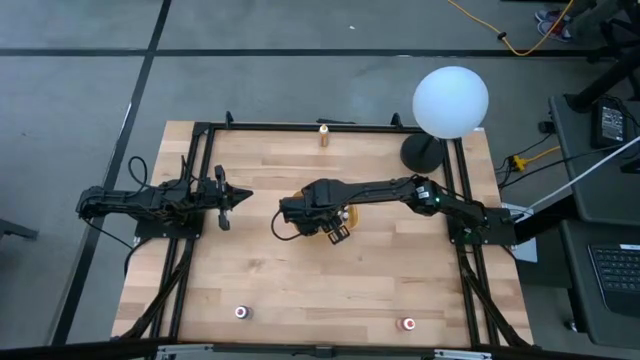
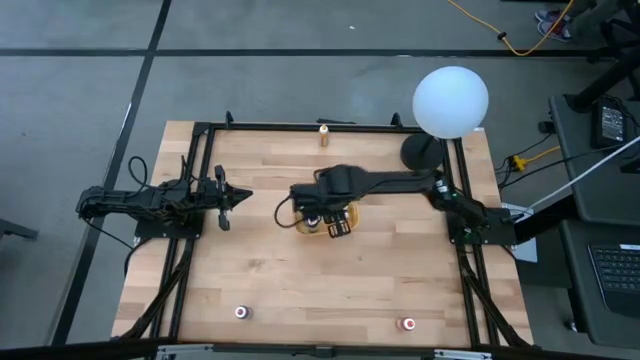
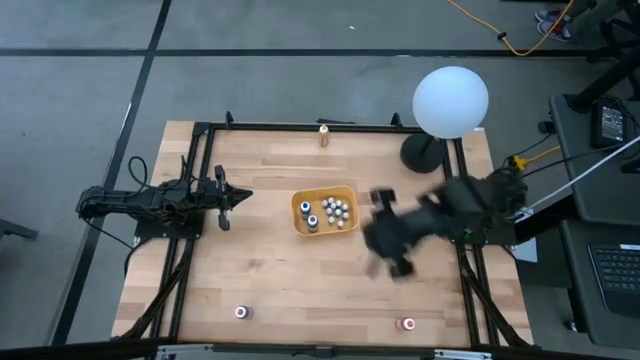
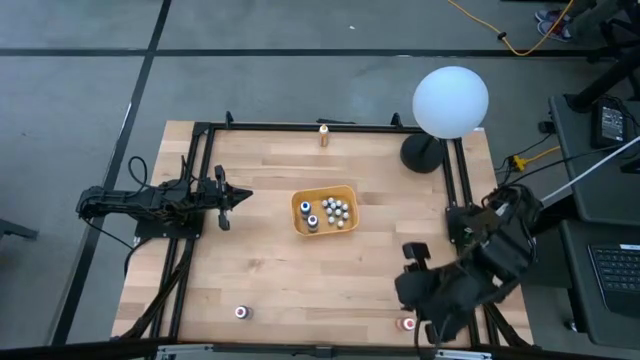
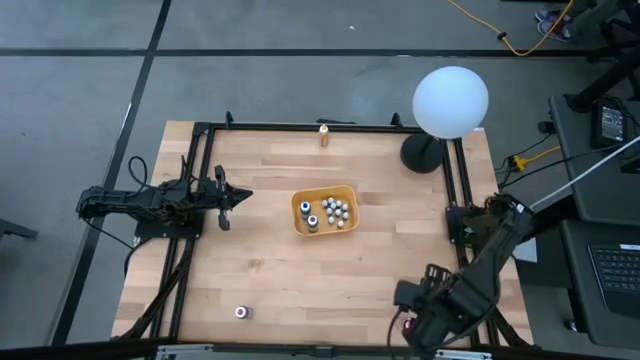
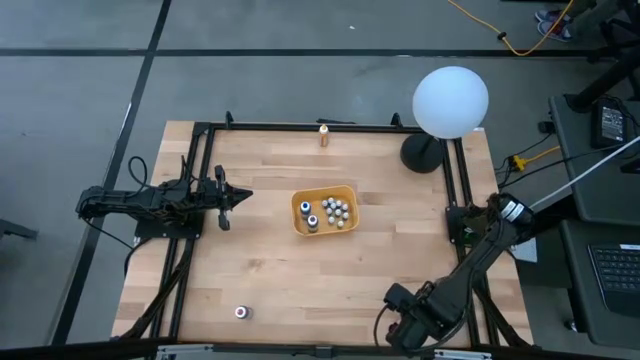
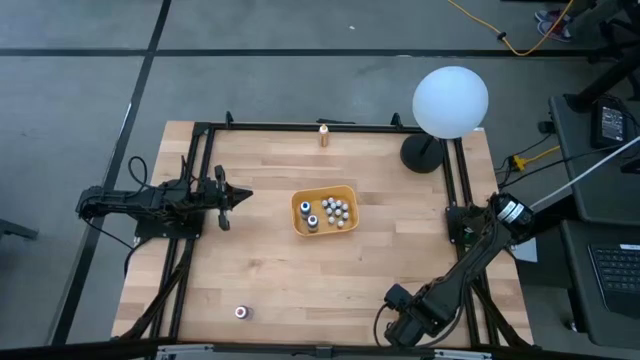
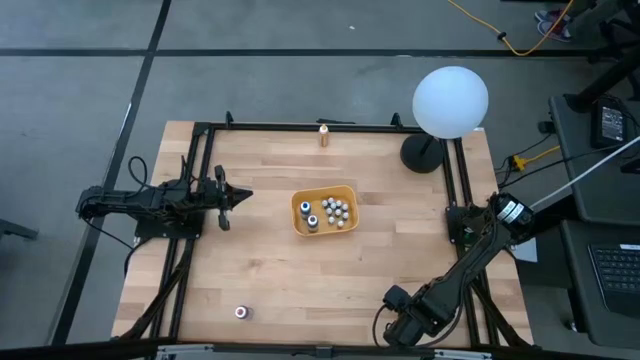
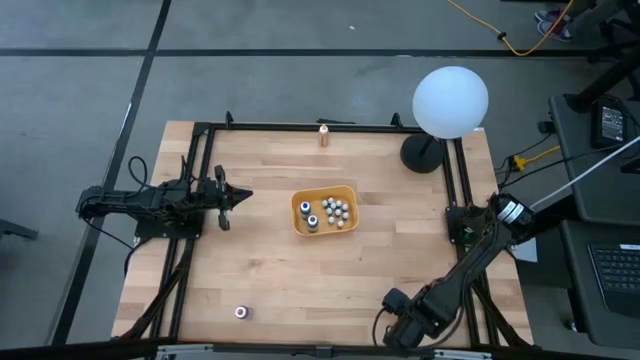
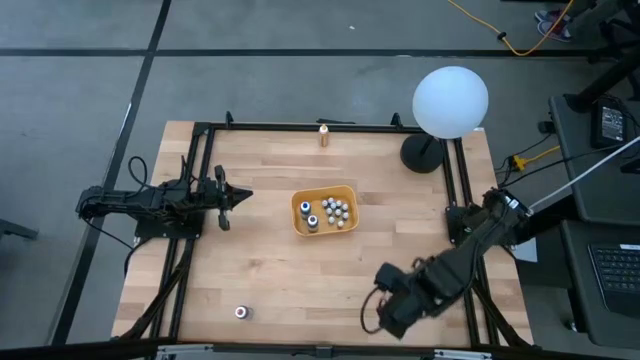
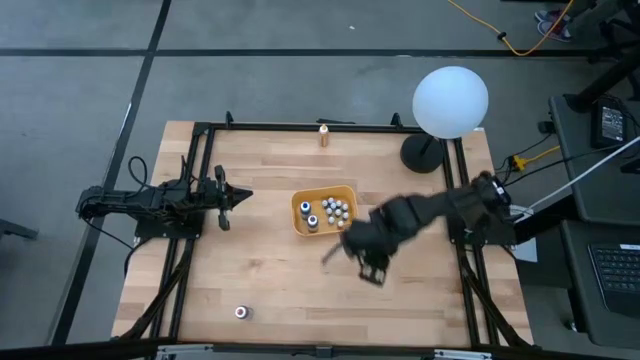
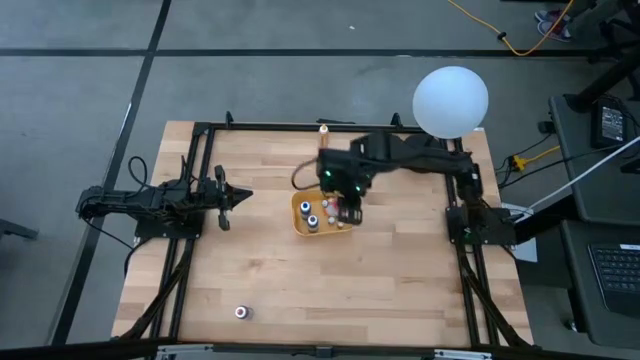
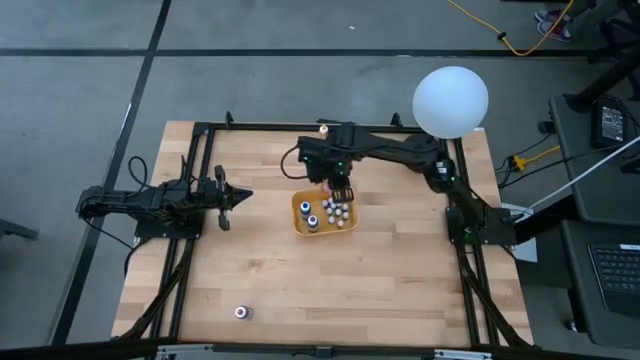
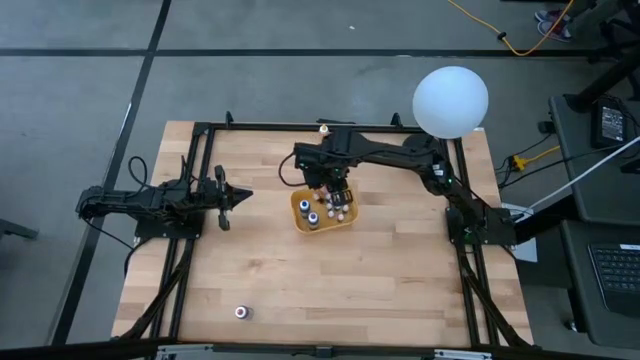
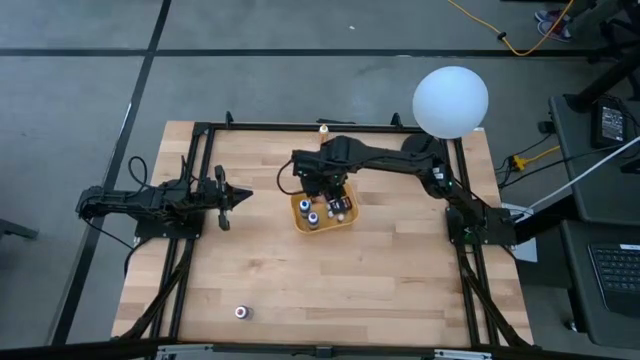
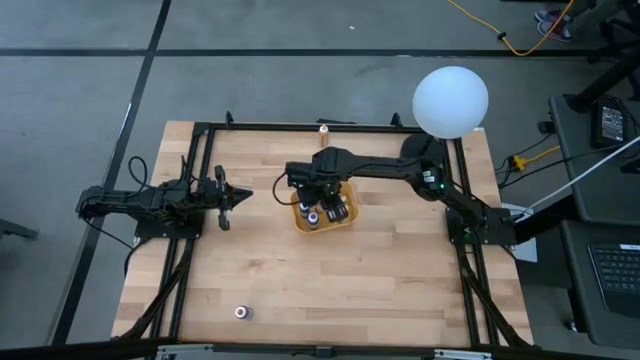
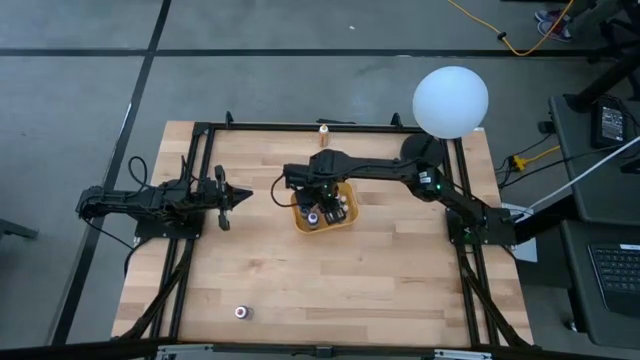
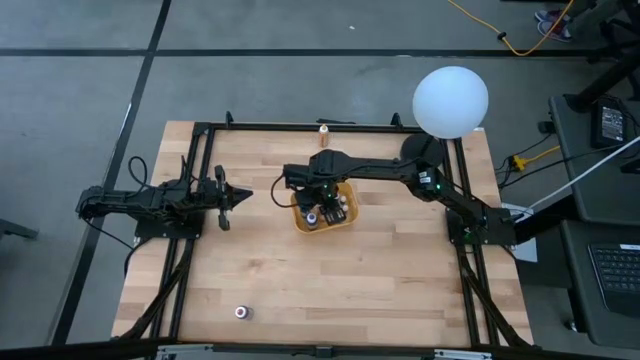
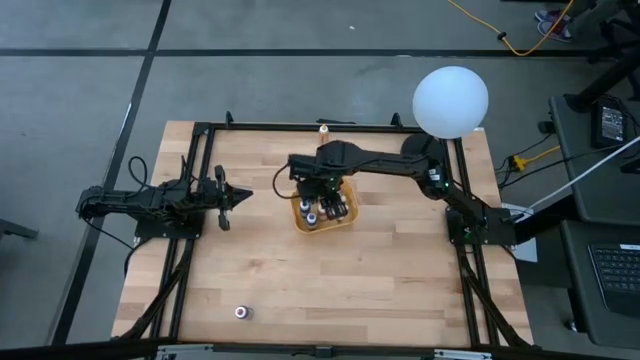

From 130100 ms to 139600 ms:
Task: Pick & Place food coloring
Put the orange food coloring bottle into the yellow bin

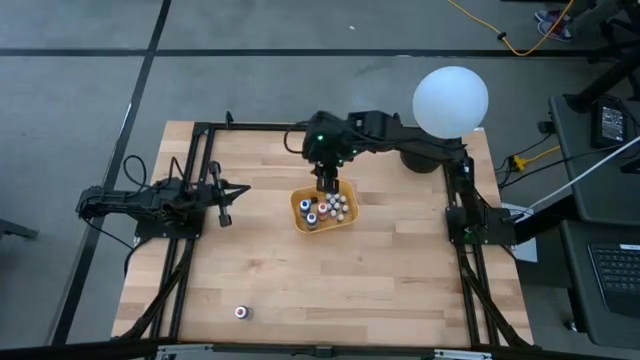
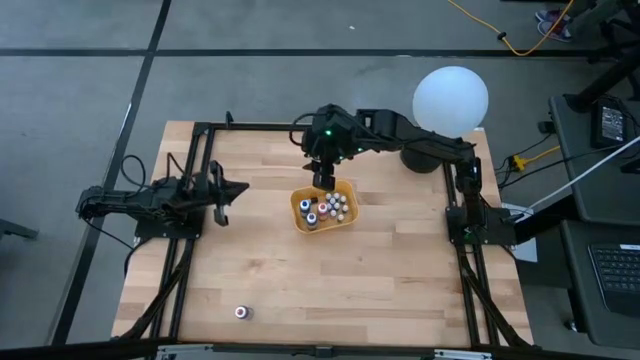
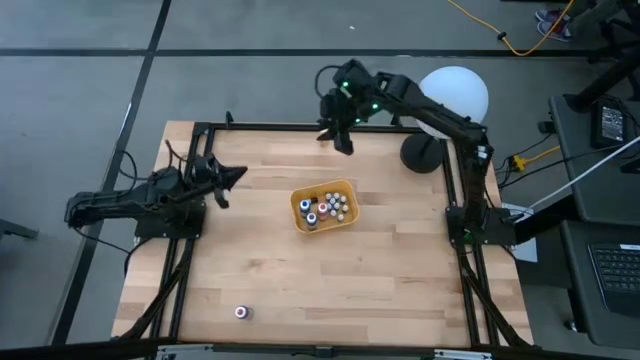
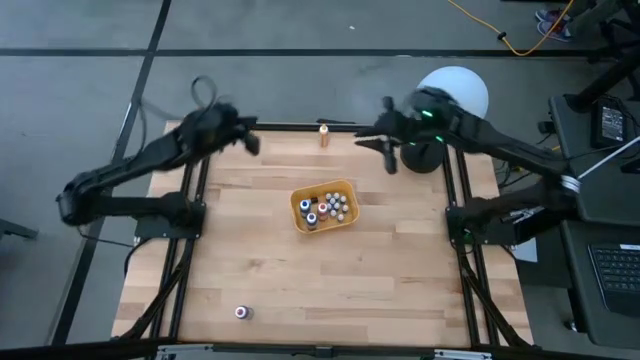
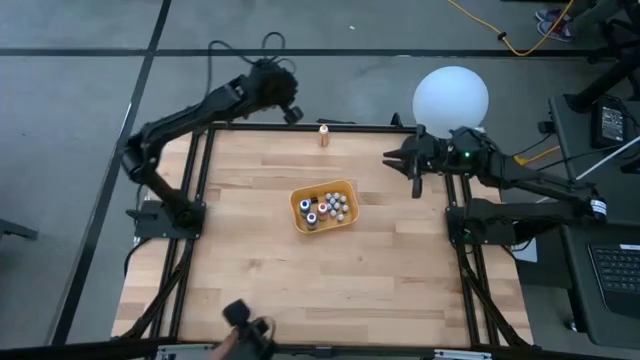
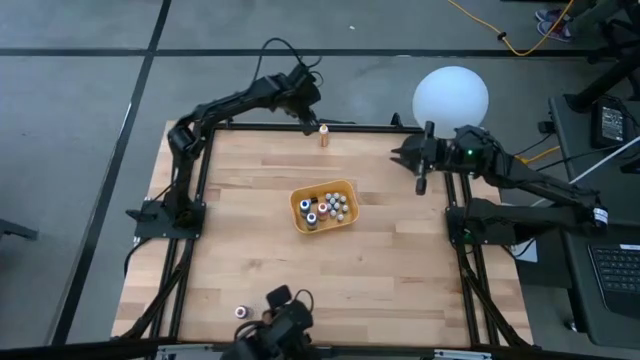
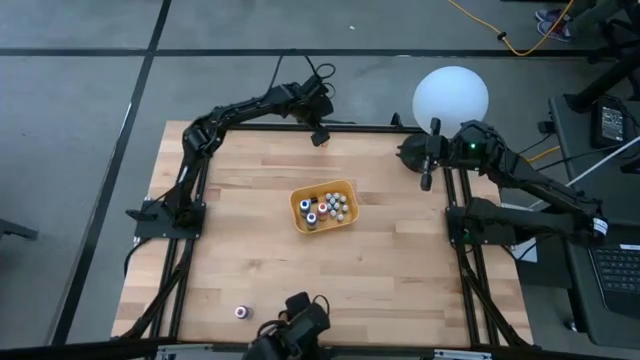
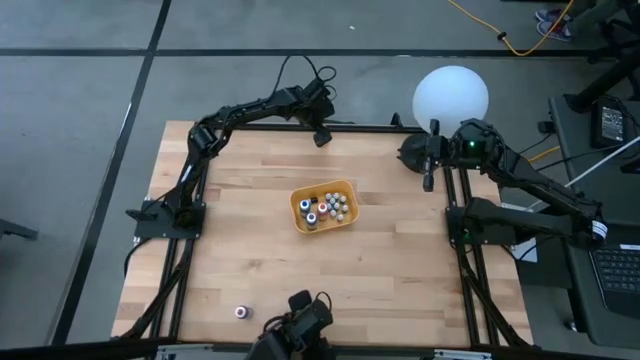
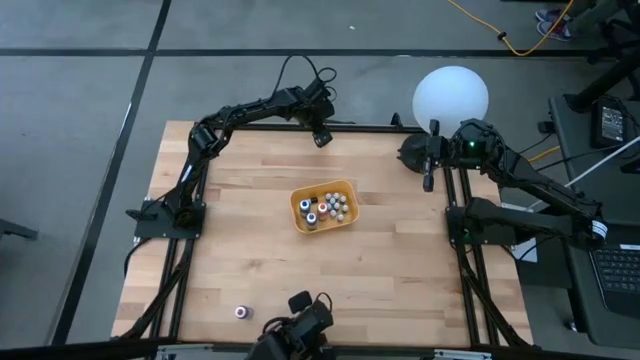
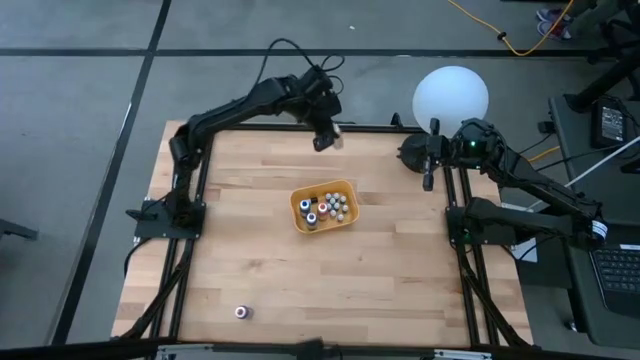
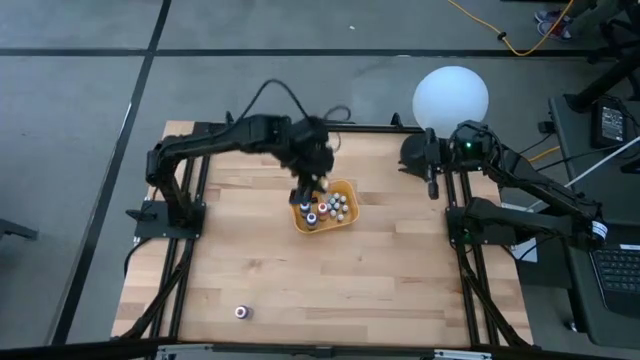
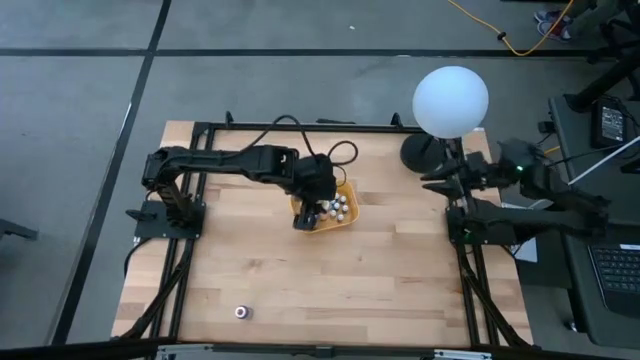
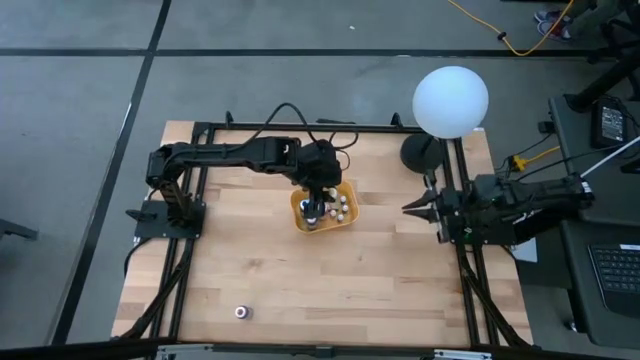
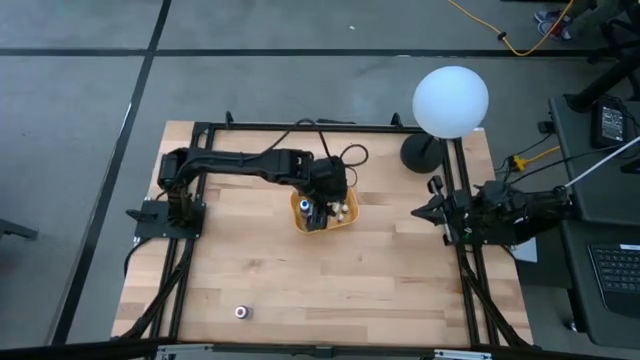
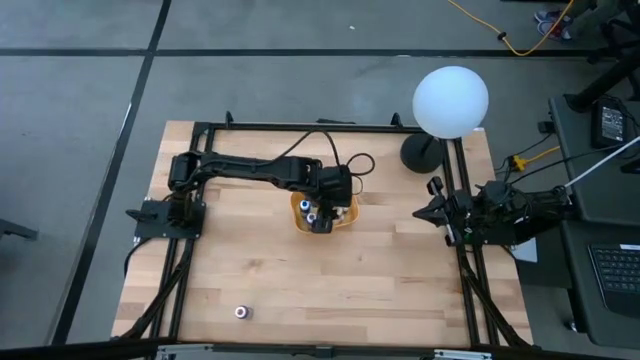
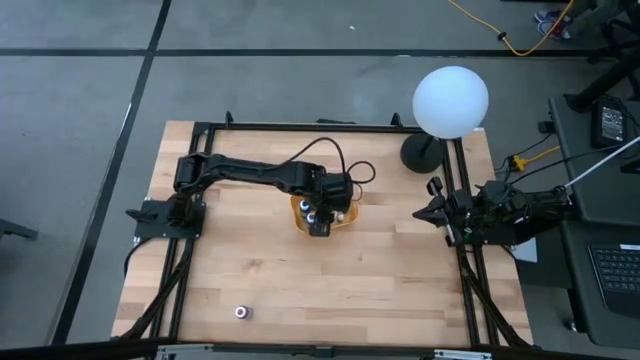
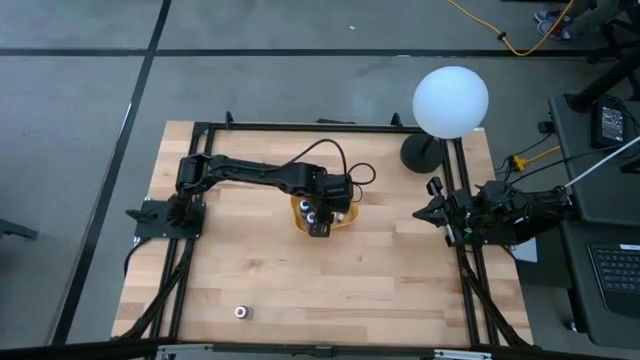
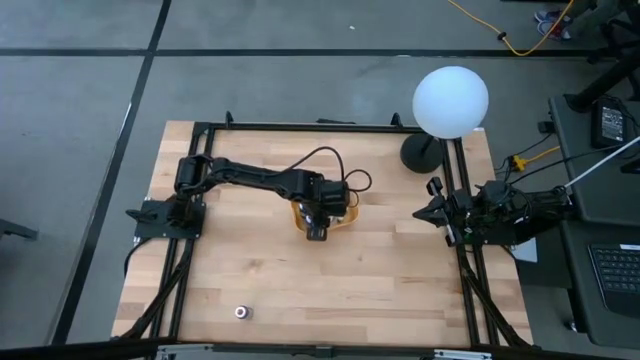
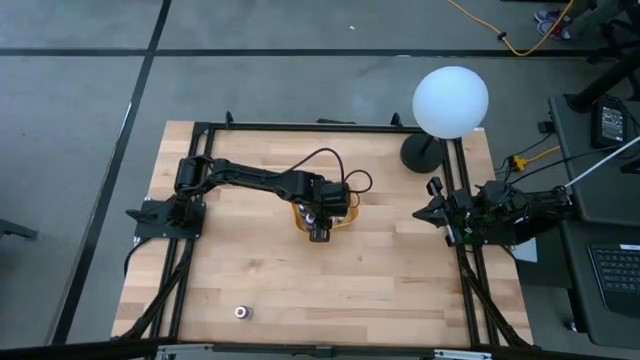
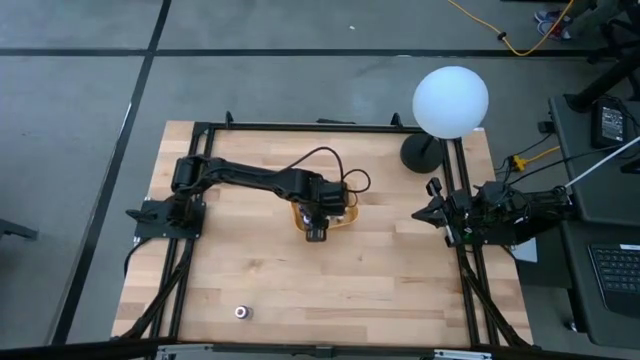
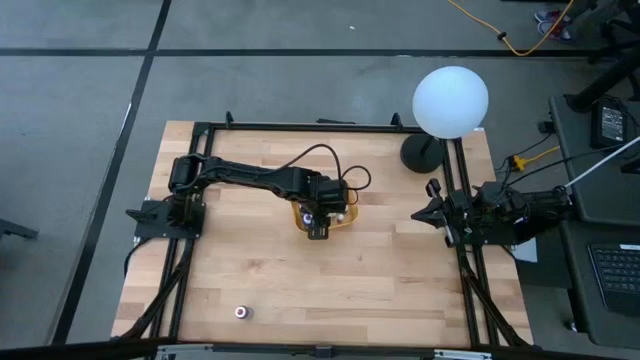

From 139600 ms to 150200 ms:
Put the yellow food coloring bottle into the yellow bin

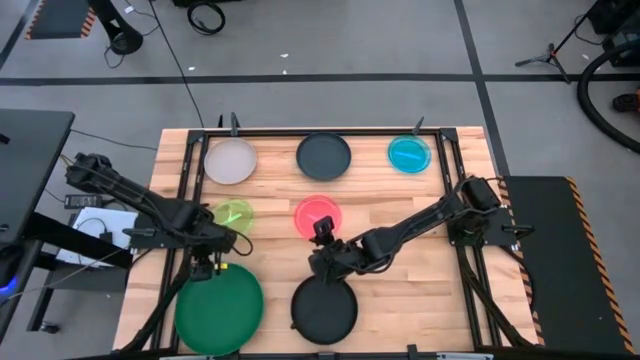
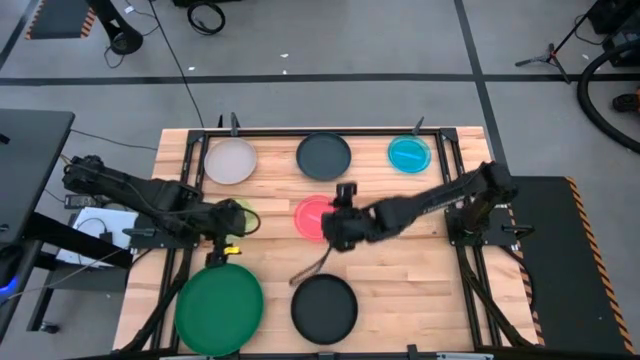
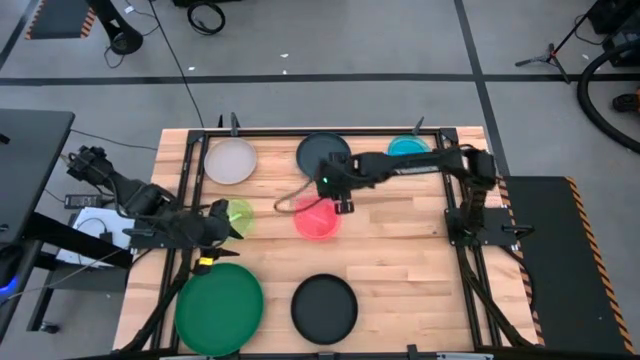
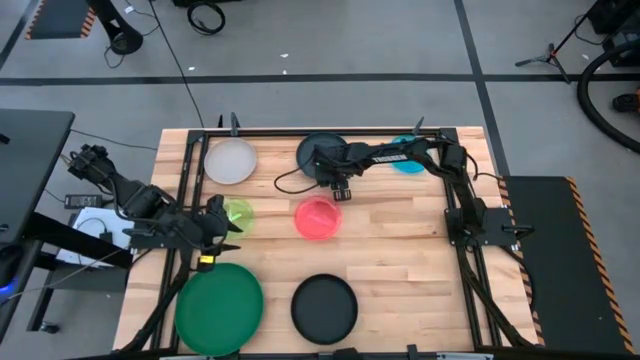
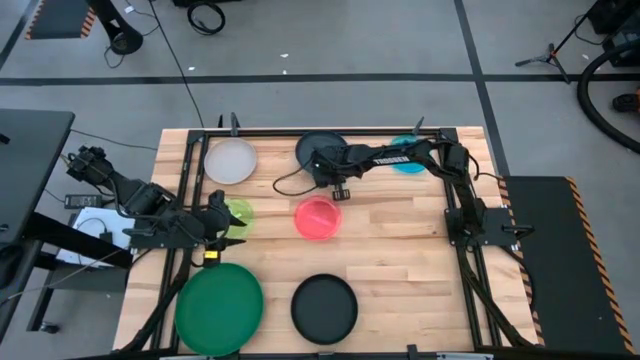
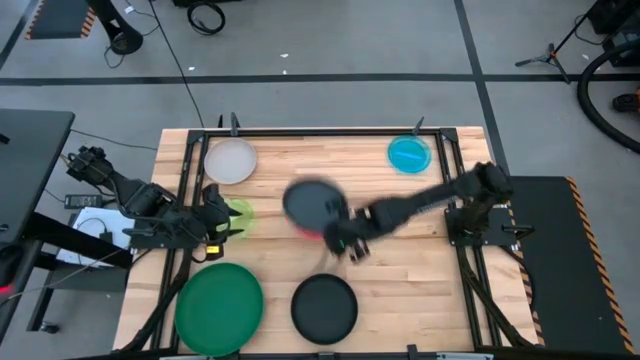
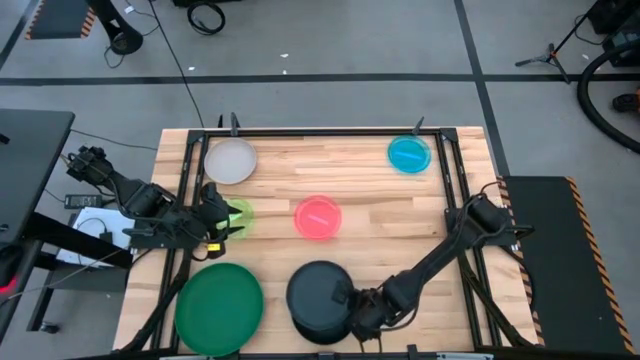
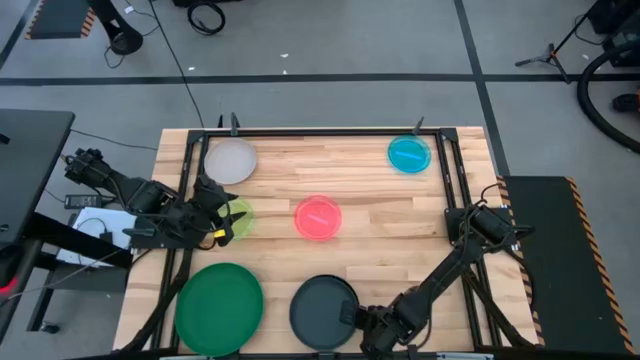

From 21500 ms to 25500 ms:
Task: Stack plastic plates
Stack the dark blue plate on top of the black plate
